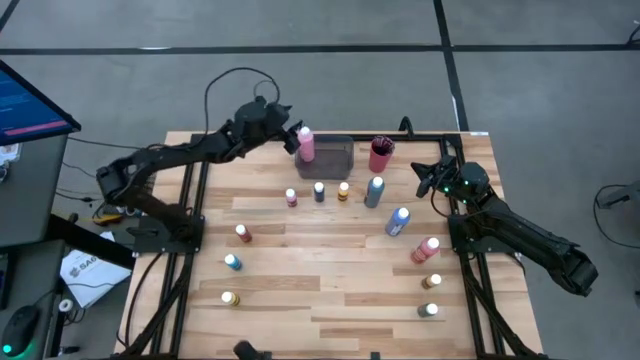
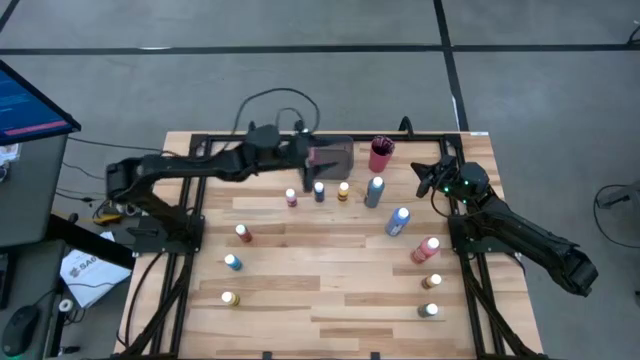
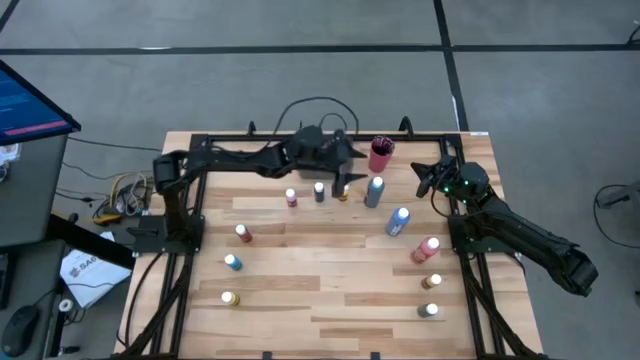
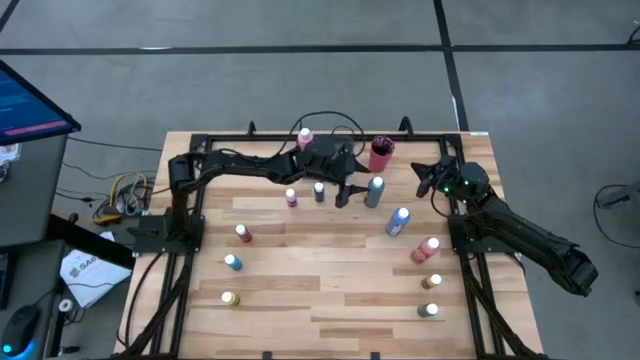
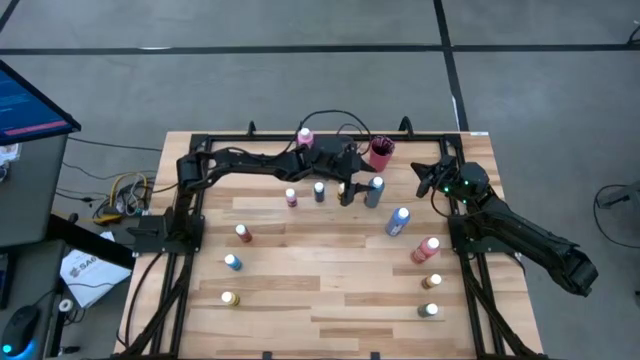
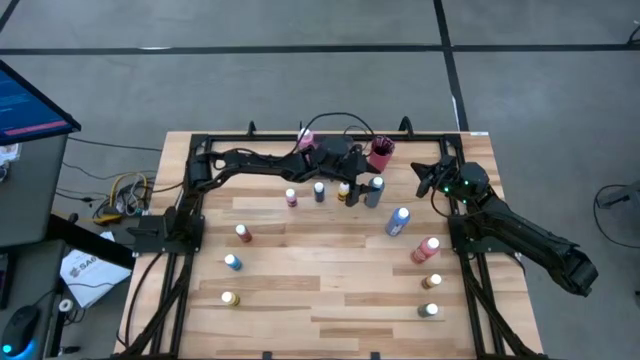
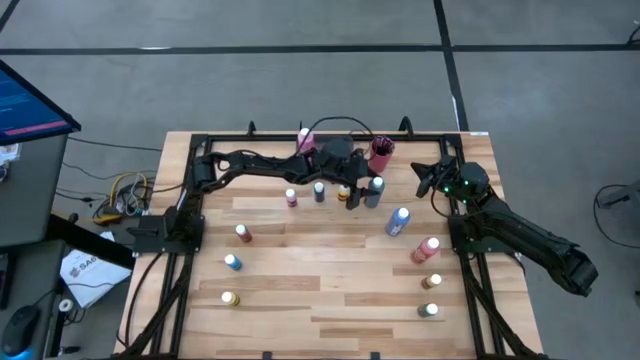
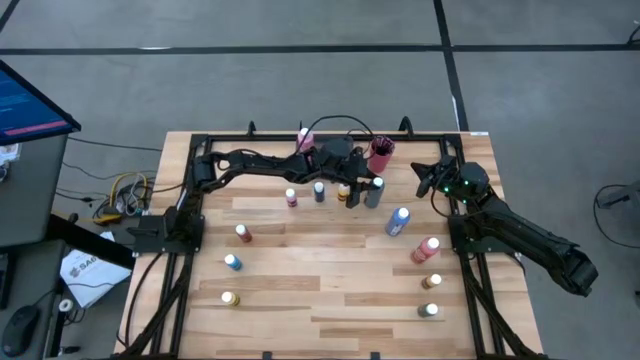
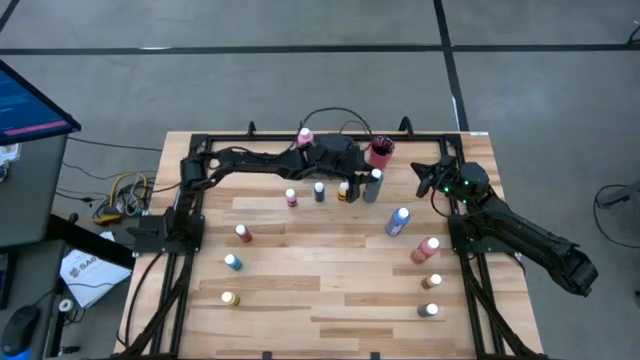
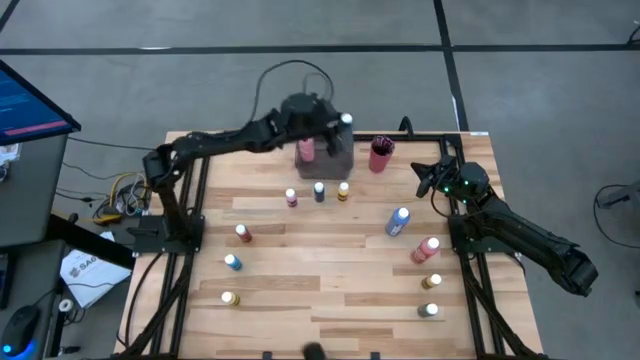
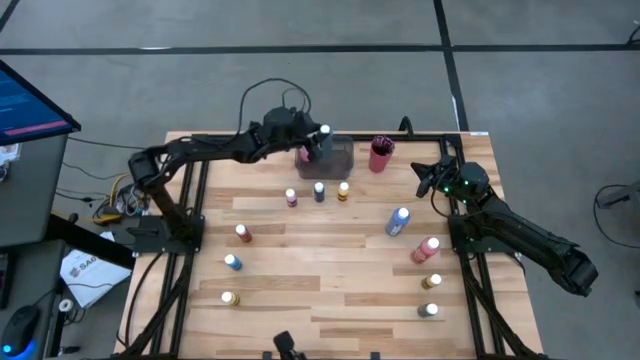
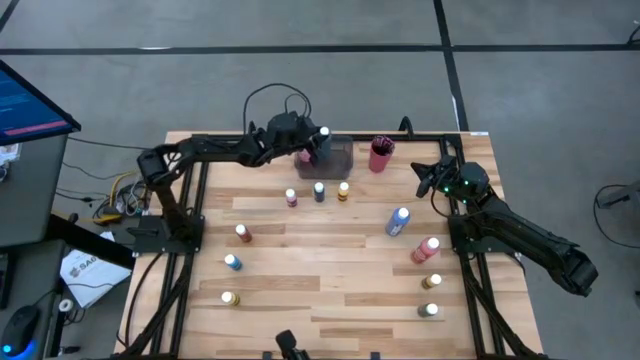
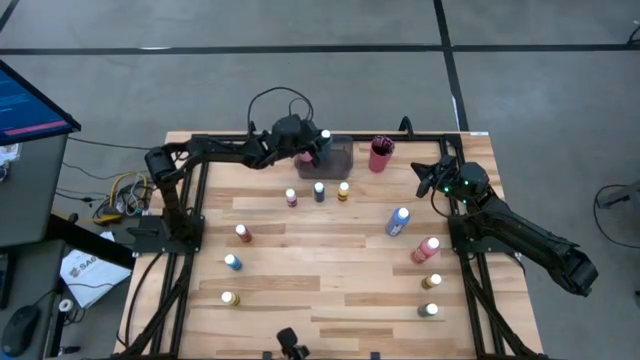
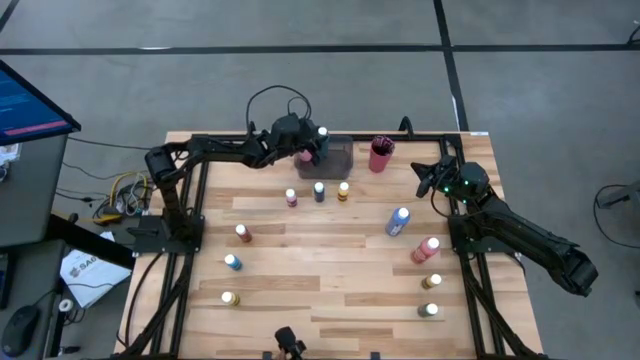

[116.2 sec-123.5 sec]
Task: Pick & Place Paint Supplies
Put the green paint bottle into the gray bin

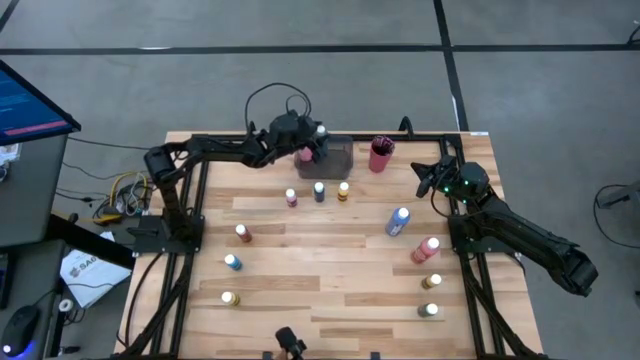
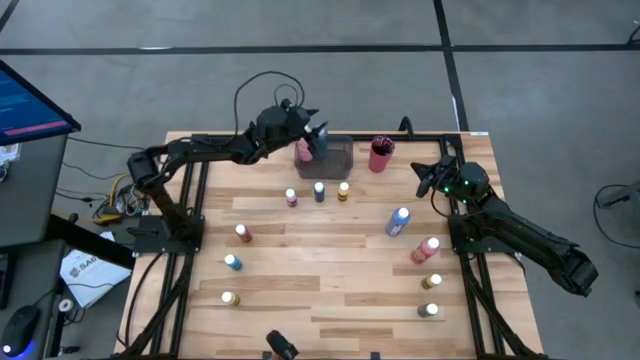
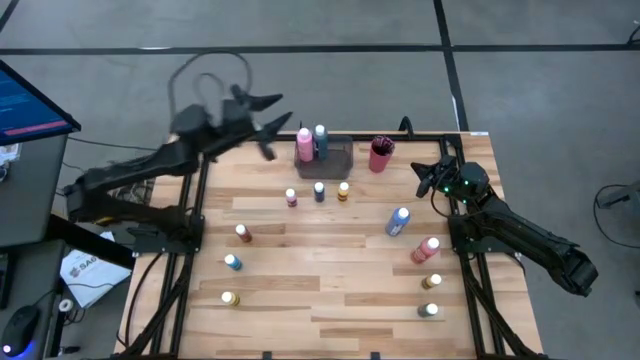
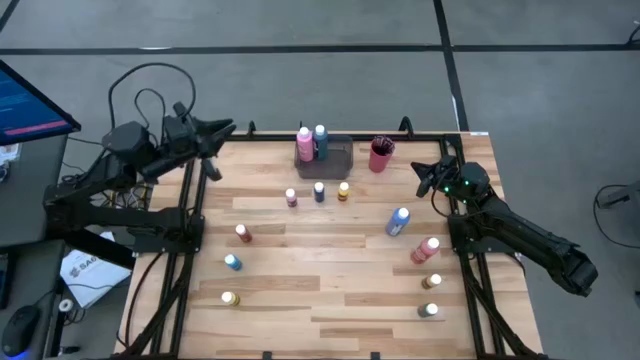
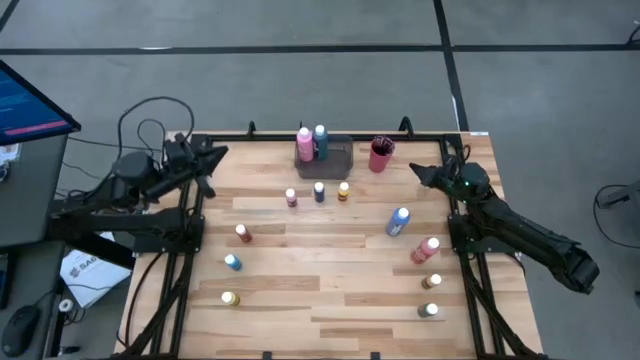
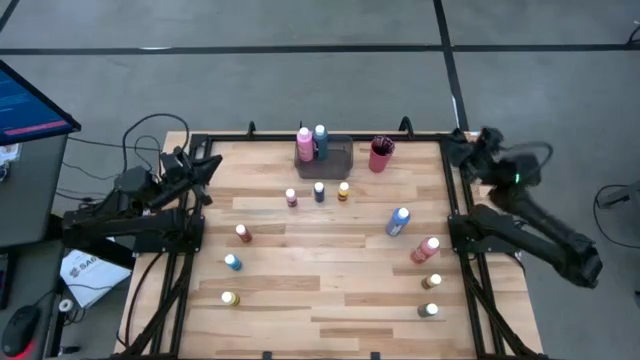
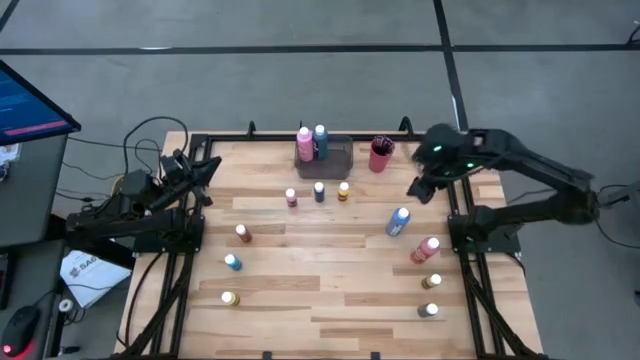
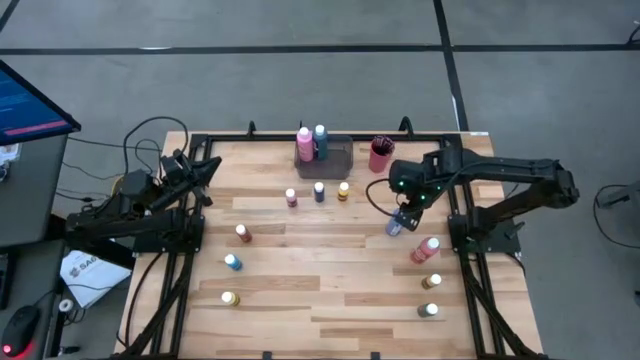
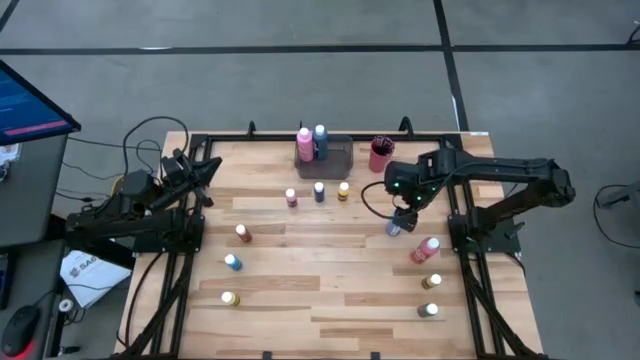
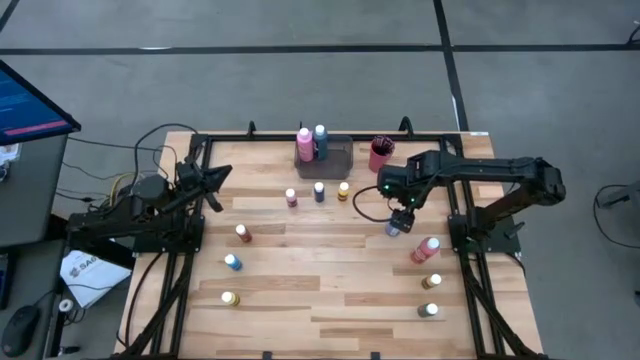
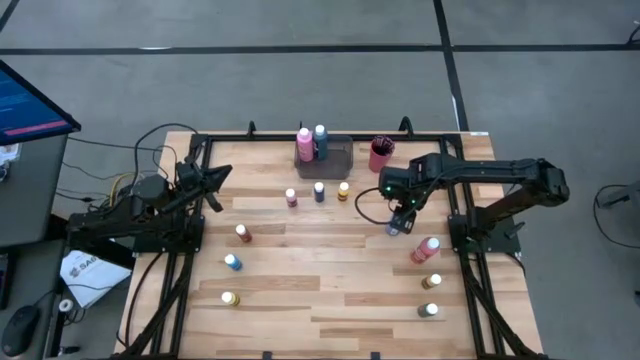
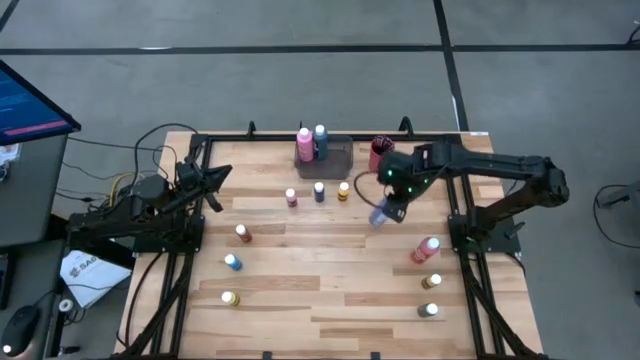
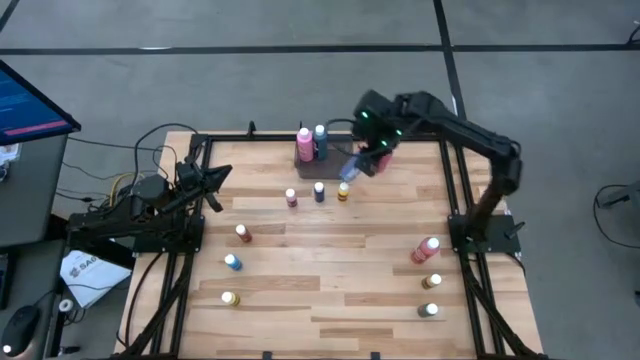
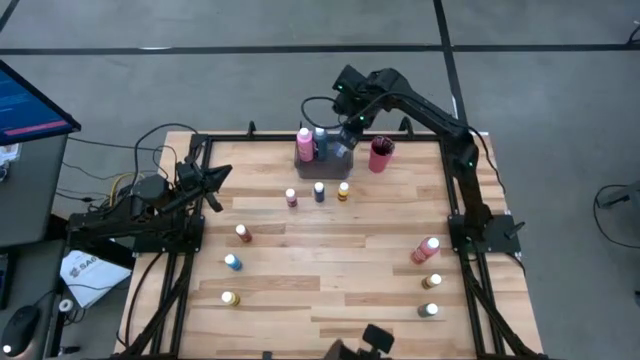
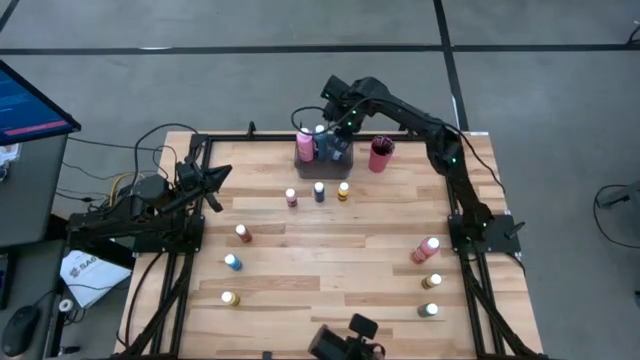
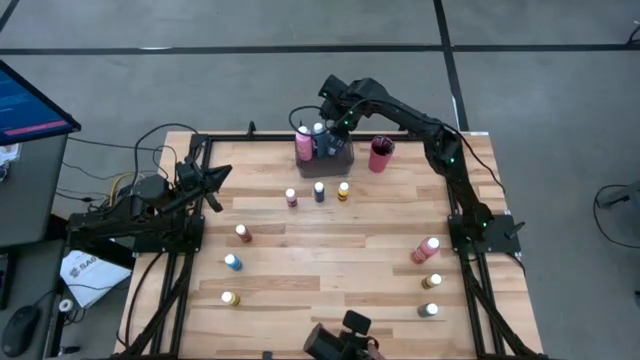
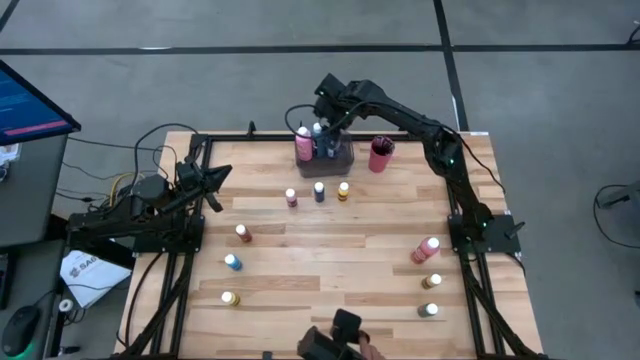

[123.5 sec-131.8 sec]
Put the blue paint bottle into the gray bin

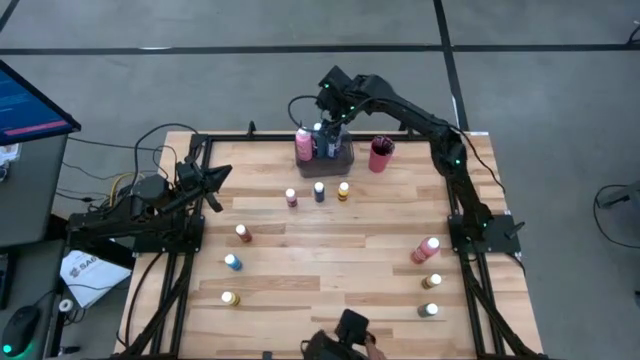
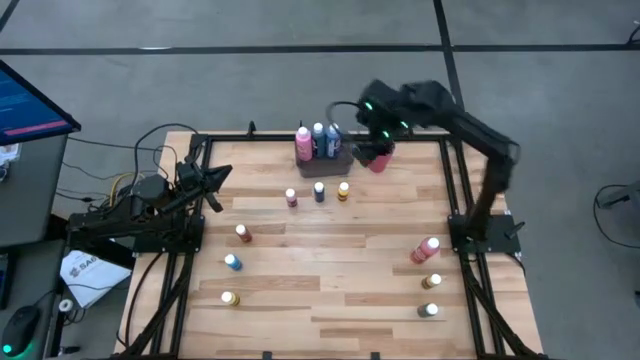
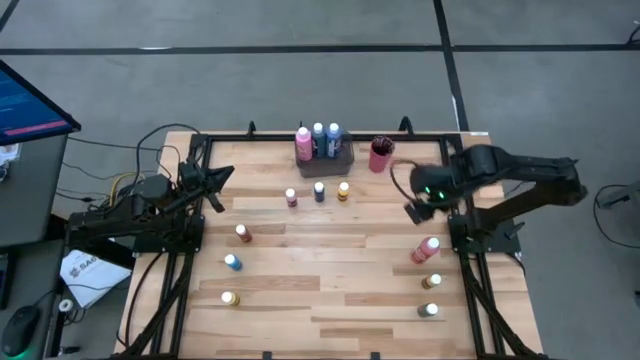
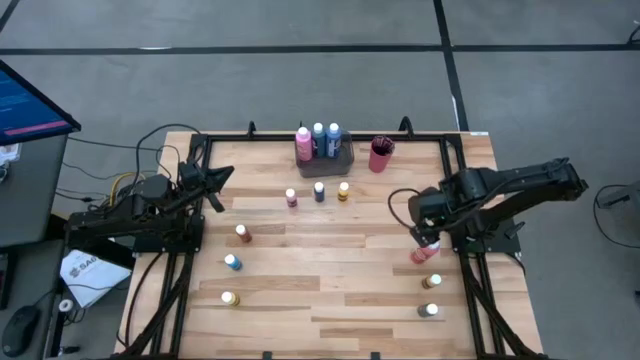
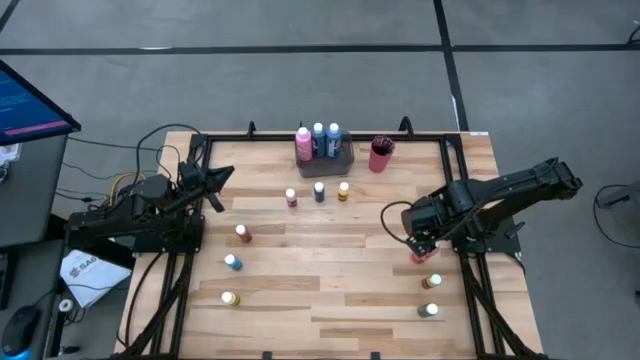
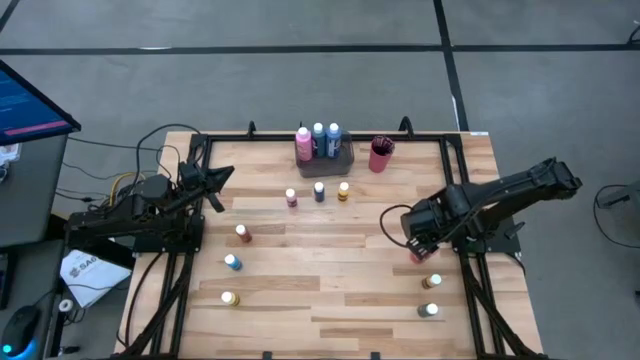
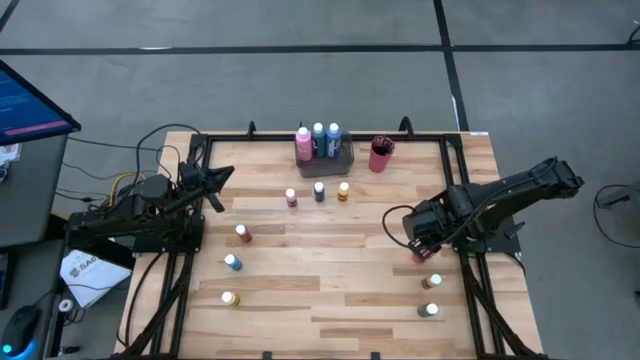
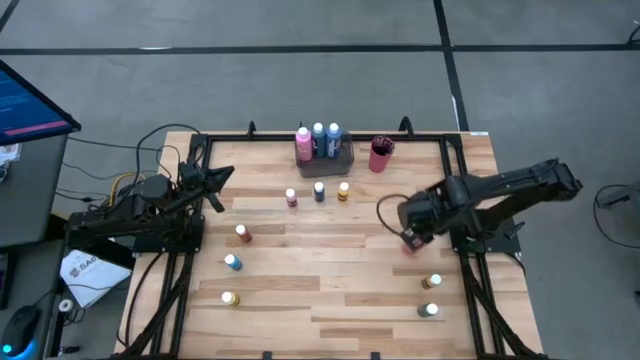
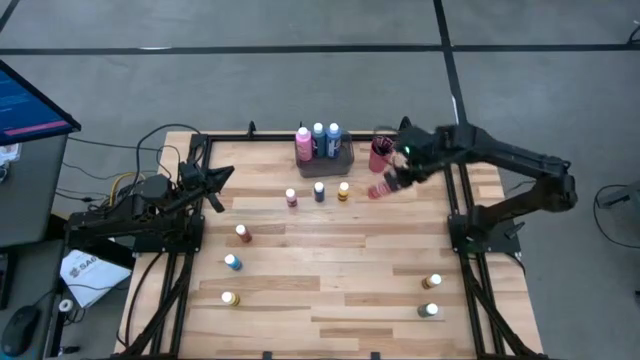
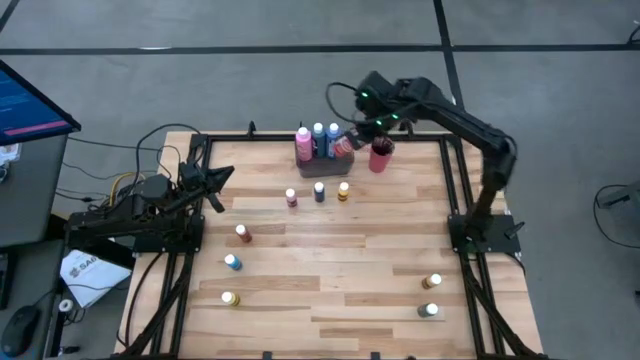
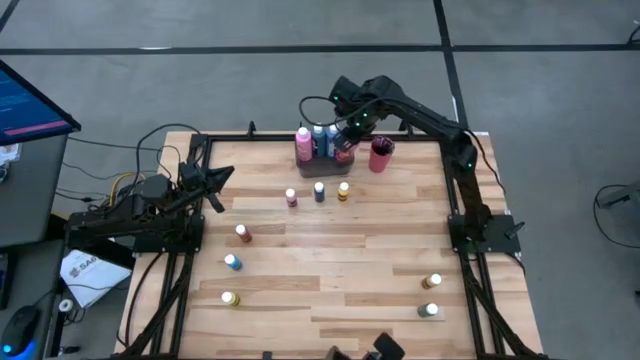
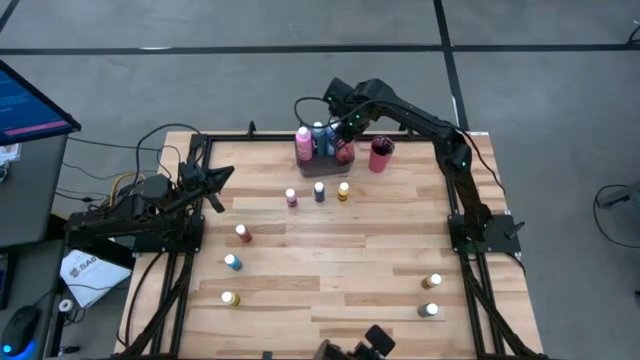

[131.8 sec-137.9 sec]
Put the pink paint bottle into the gray bin
